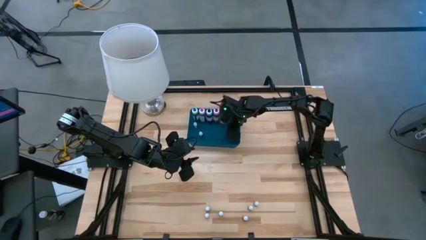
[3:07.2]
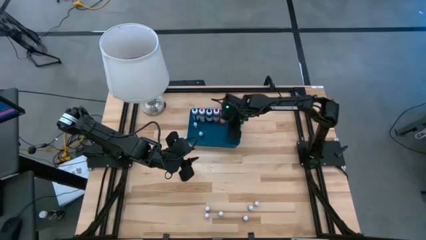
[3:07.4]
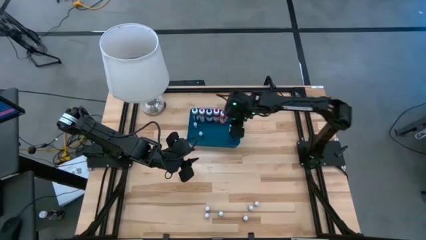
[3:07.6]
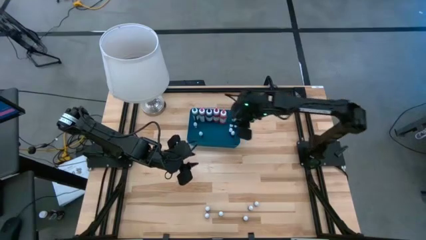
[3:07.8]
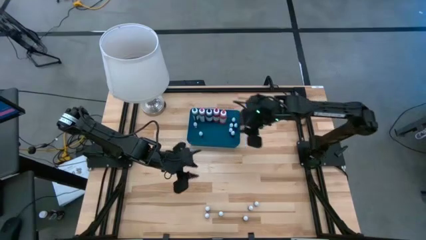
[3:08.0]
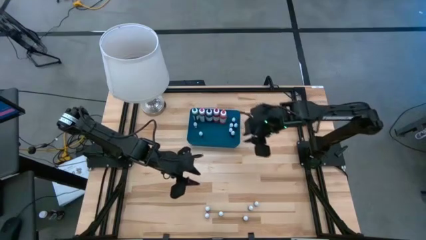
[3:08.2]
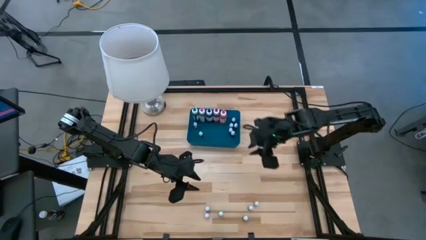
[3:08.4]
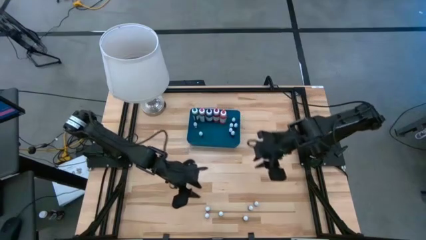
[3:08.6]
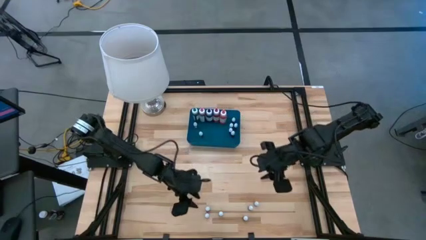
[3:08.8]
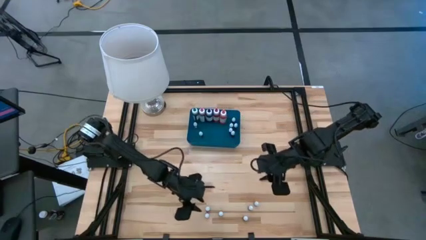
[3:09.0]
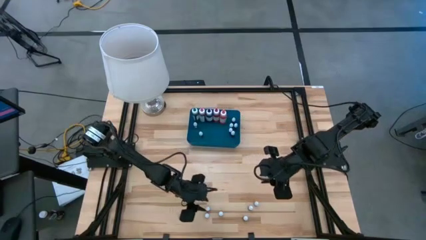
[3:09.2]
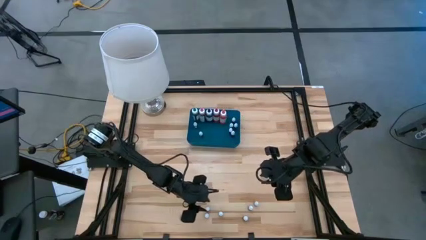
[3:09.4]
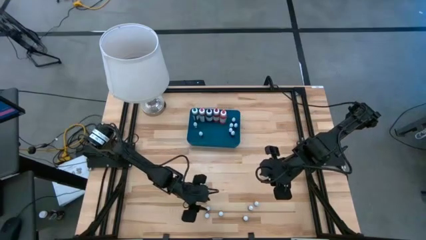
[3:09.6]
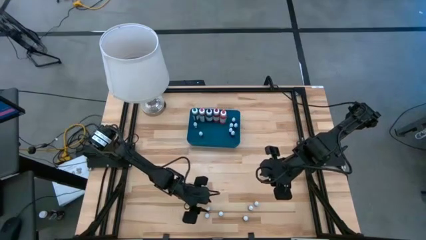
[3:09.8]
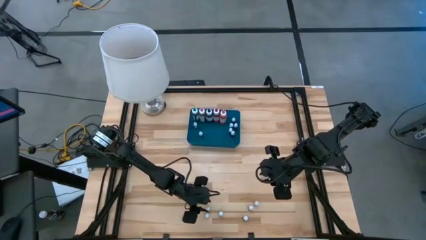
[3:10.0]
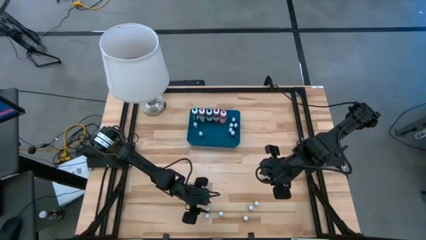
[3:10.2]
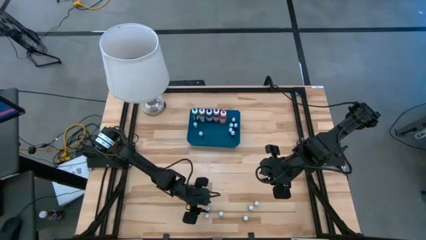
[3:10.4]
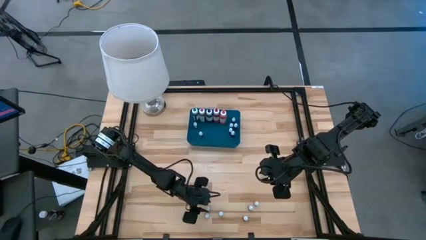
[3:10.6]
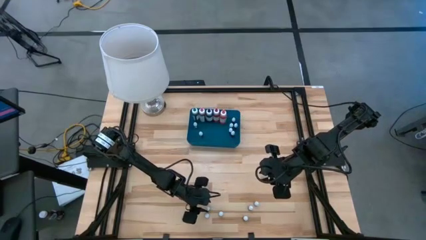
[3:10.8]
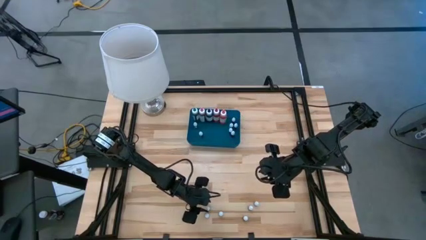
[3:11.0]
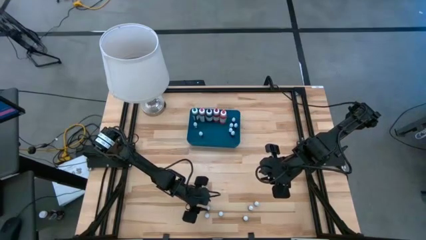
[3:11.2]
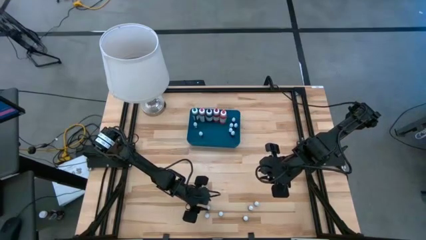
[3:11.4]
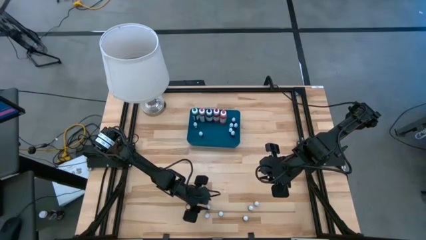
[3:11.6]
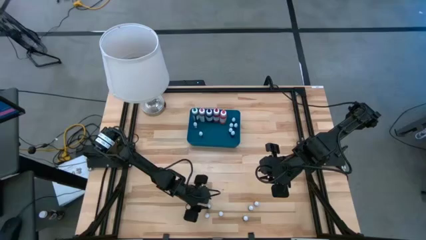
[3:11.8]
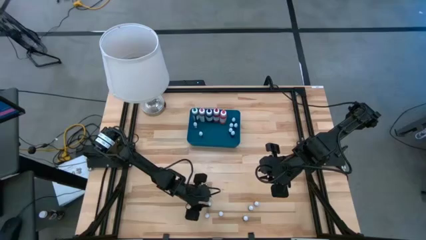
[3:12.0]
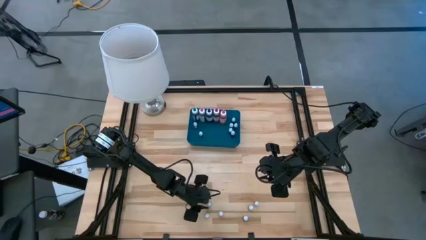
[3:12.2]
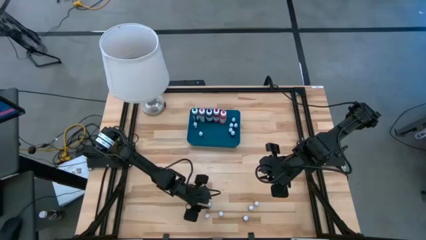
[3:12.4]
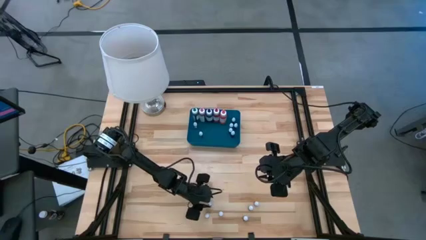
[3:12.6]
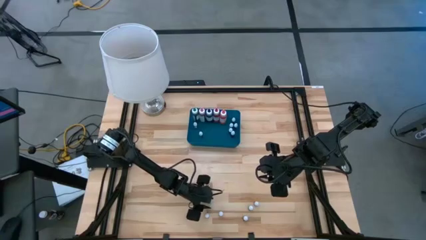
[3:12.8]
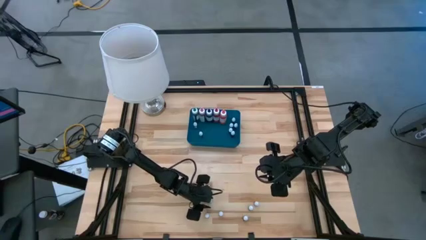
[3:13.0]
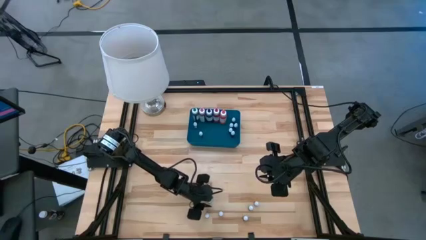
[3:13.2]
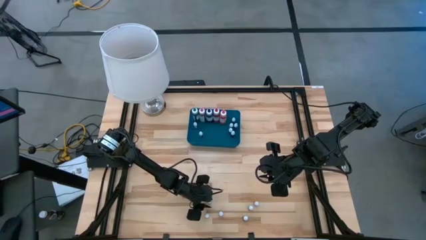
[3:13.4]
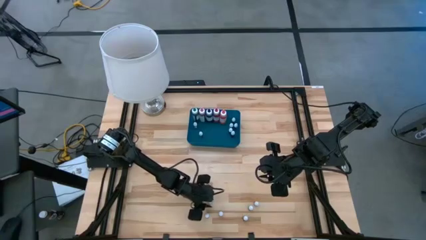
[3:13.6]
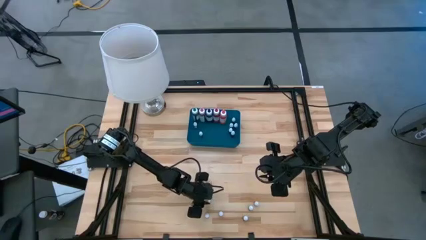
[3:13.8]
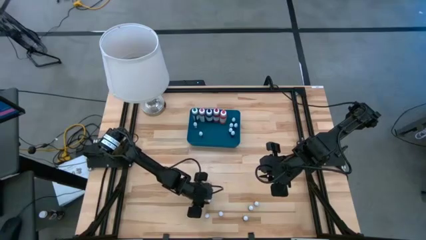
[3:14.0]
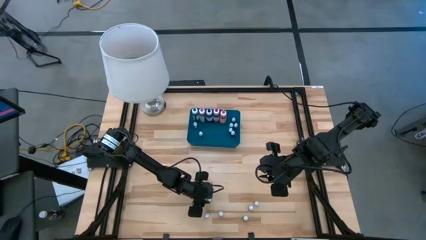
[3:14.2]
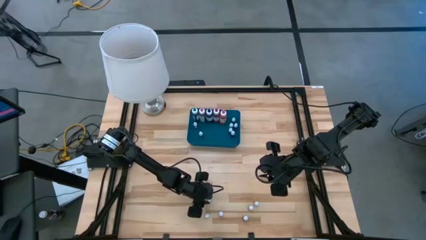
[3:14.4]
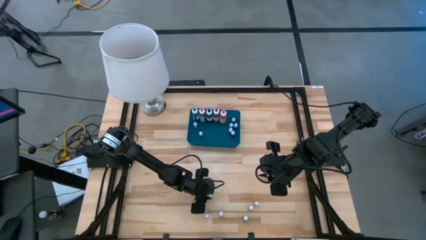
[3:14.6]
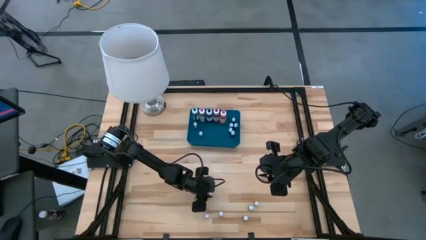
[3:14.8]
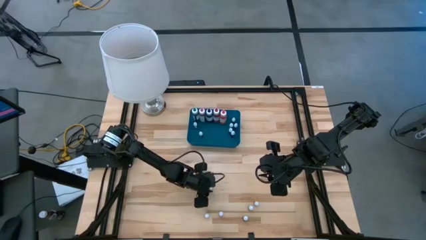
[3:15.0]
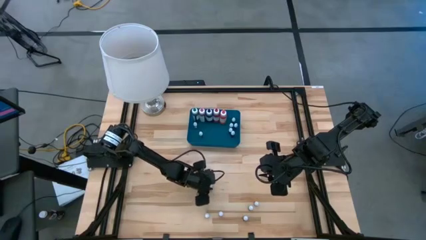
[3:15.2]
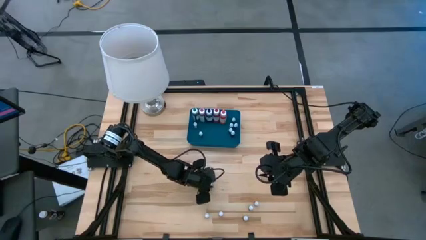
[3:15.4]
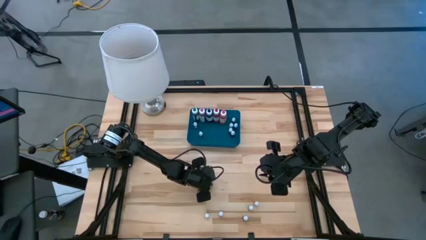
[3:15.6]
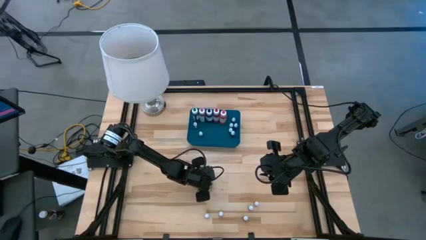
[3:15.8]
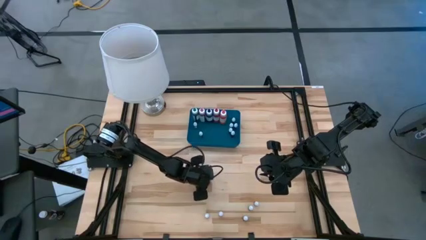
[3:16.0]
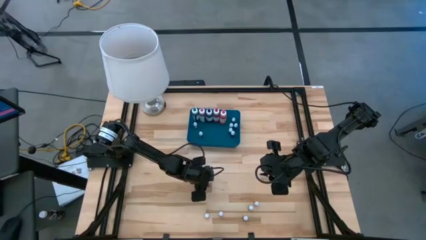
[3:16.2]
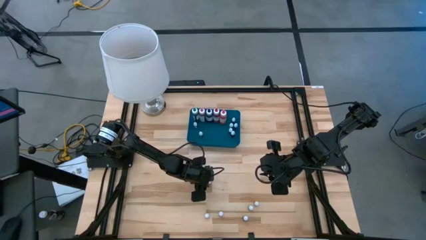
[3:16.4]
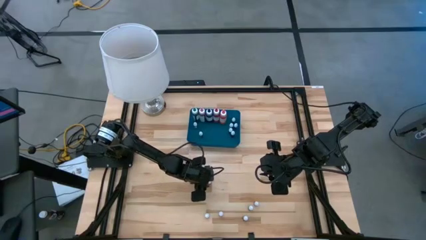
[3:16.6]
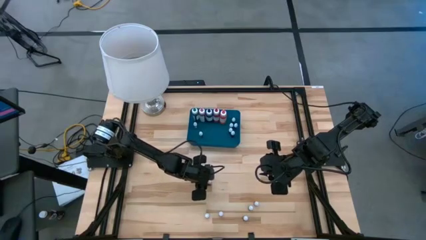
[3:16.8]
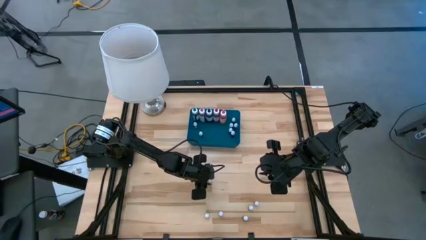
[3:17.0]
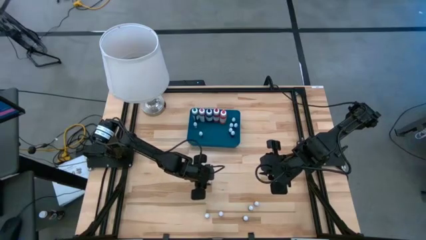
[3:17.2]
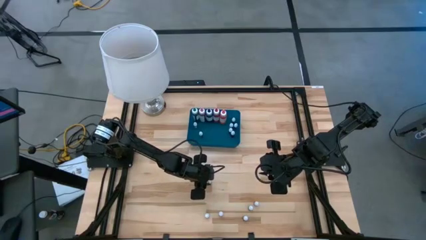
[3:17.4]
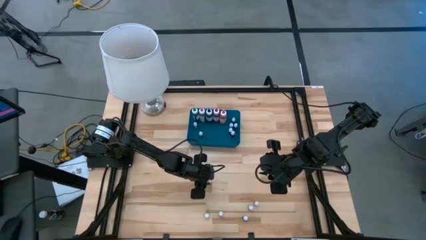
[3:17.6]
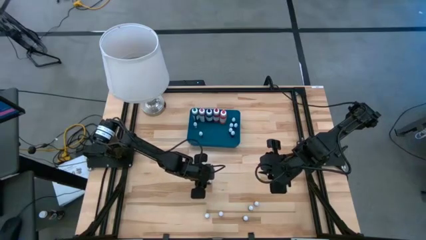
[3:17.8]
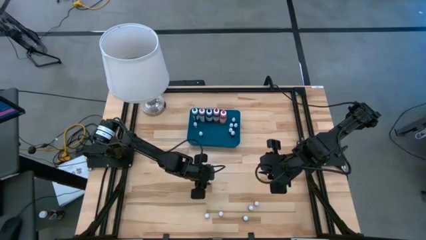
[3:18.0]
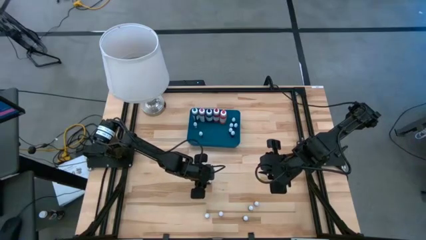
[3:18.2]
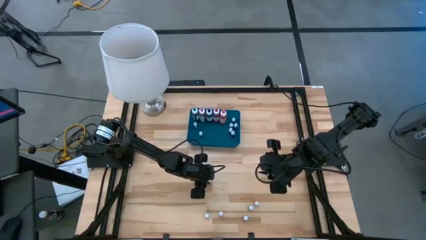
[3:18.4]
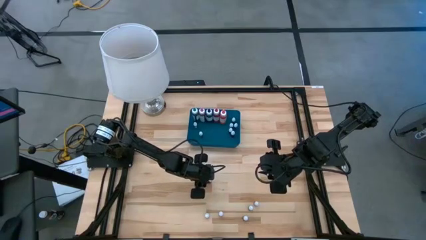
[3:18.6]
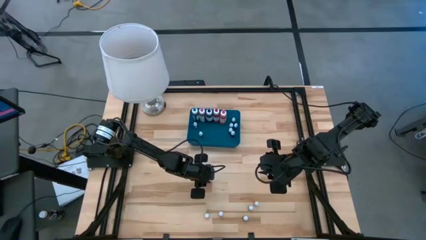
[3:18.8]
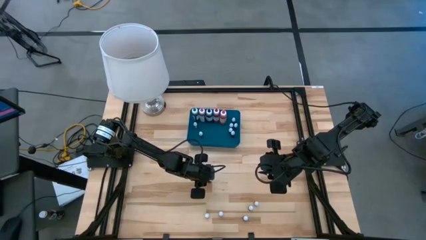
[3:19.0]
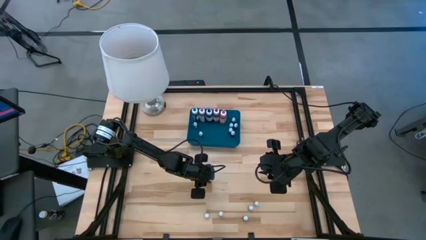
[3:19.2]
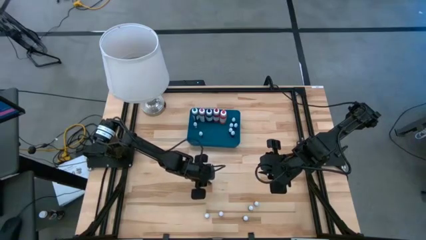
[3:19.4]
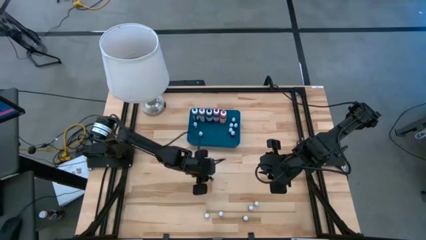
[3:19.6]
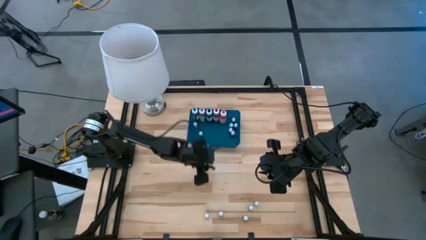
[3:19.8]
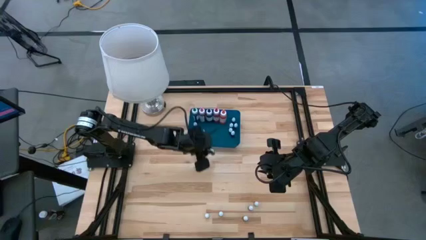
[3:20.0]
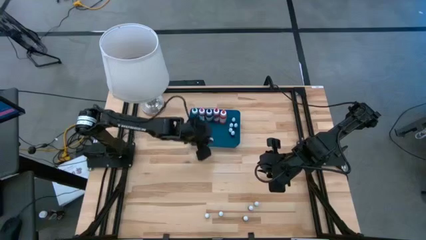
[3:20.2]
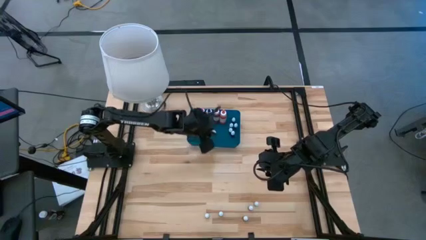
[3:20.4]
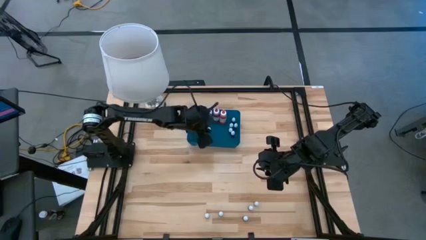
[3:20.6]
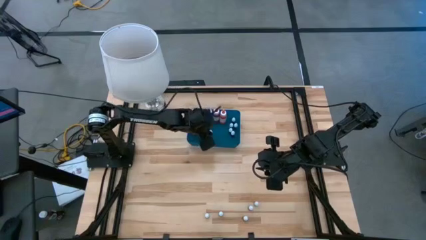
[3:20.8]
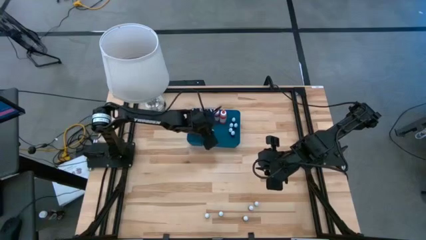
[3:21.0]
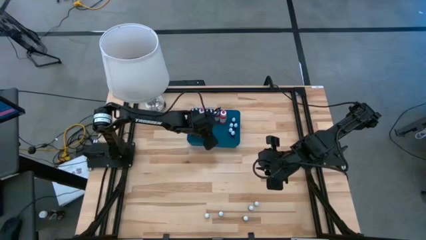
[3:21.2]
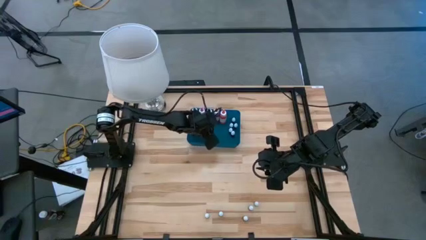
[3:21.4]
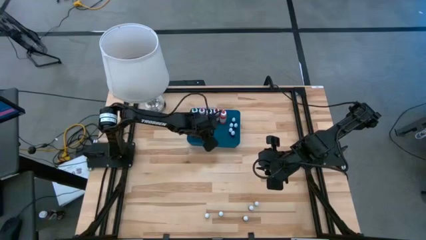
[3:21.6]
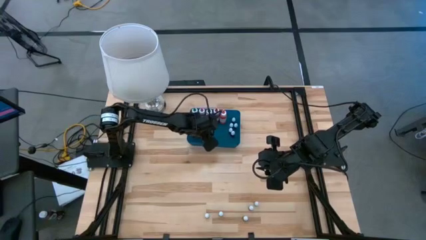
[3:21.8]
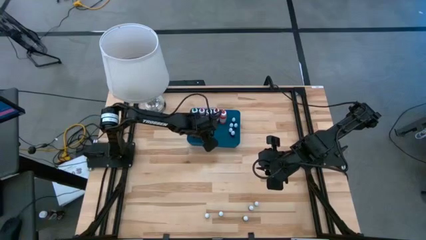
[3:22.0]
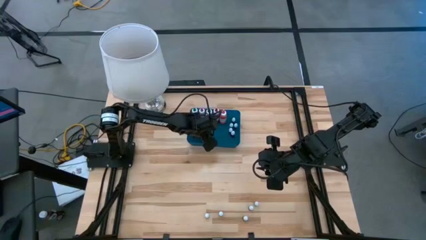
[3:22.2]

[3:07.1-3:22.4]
Task: Pick & Place food coloring
Put the small black food coloring bottle into the bin
